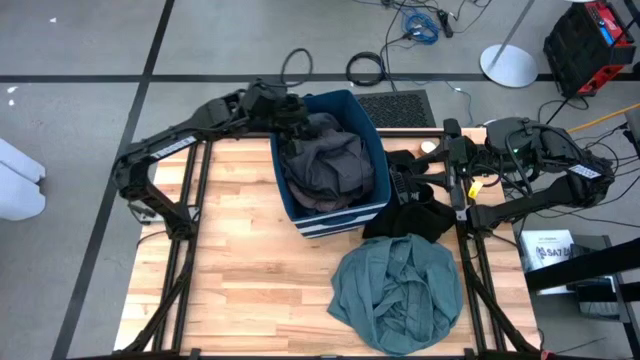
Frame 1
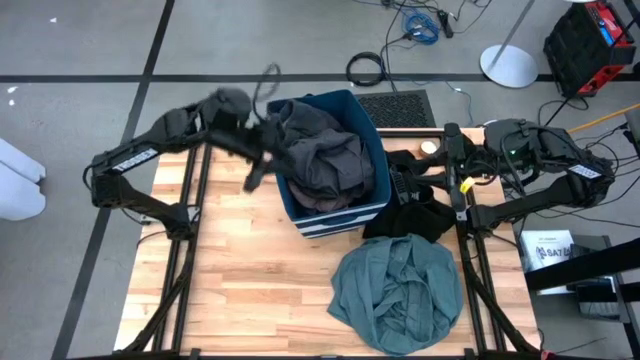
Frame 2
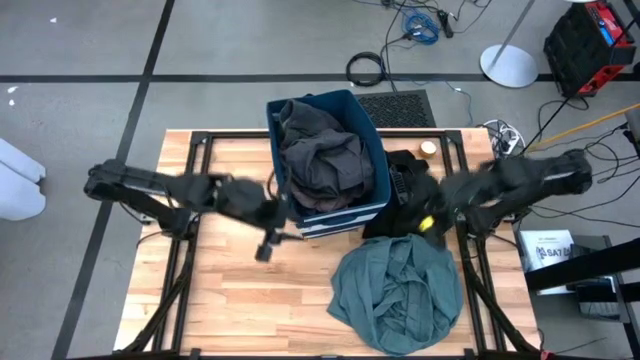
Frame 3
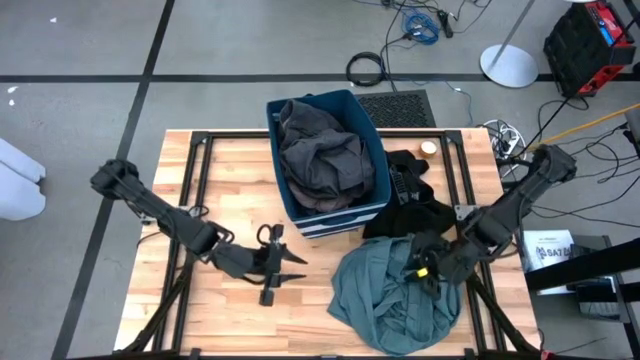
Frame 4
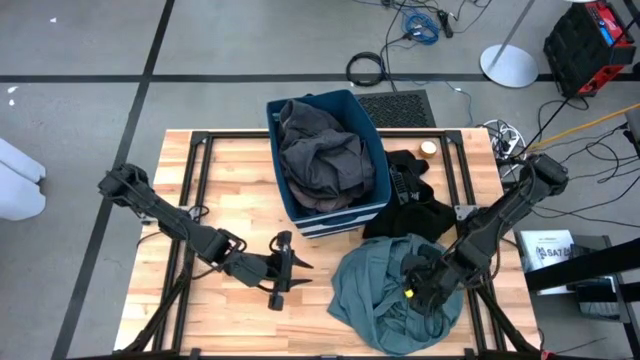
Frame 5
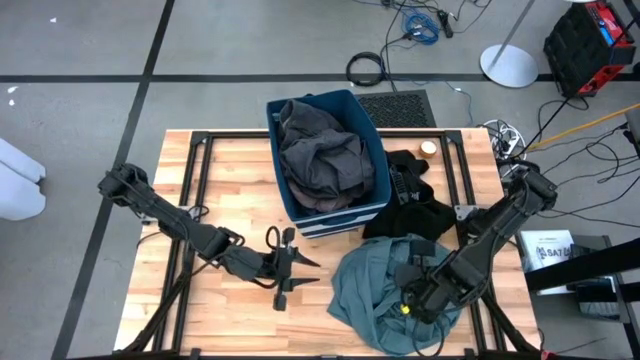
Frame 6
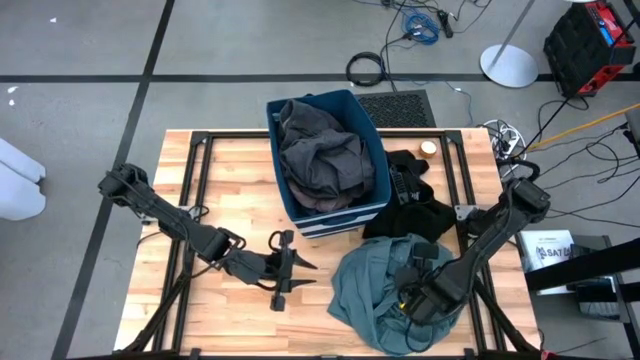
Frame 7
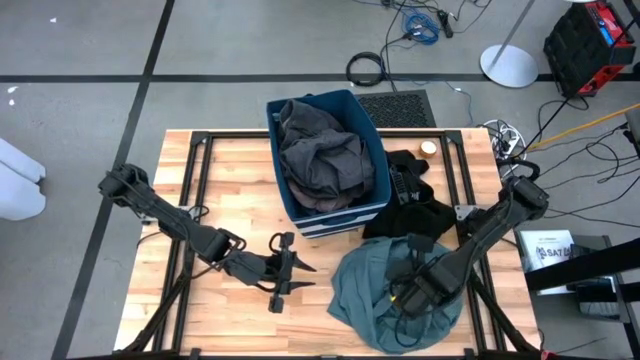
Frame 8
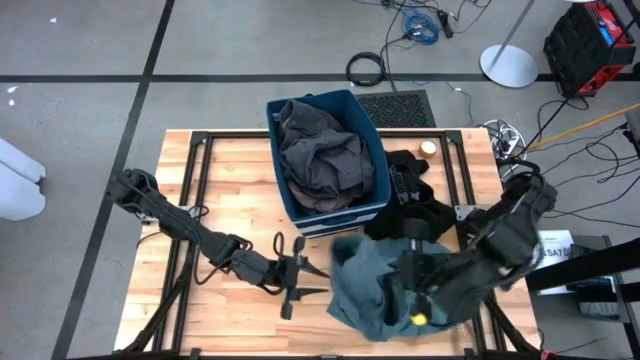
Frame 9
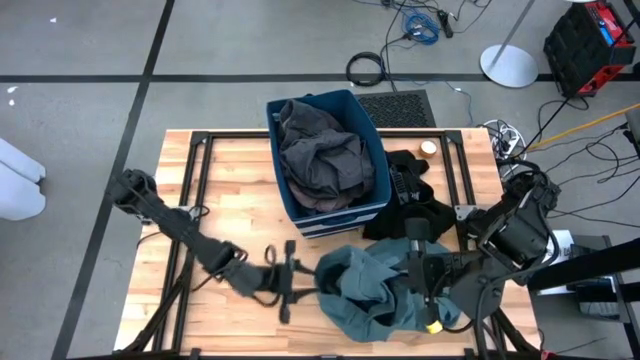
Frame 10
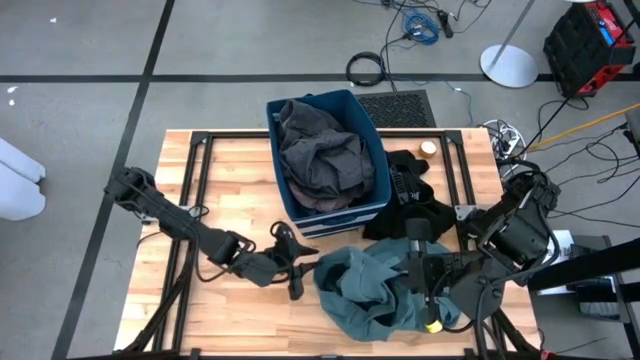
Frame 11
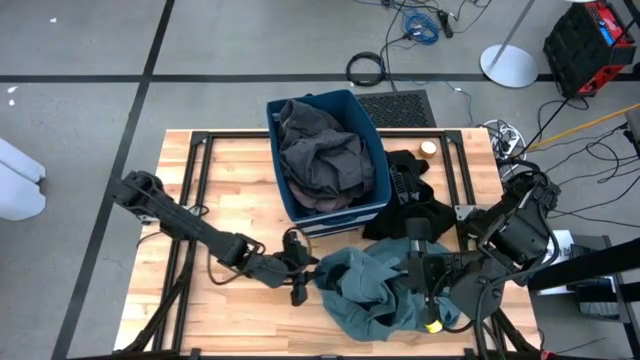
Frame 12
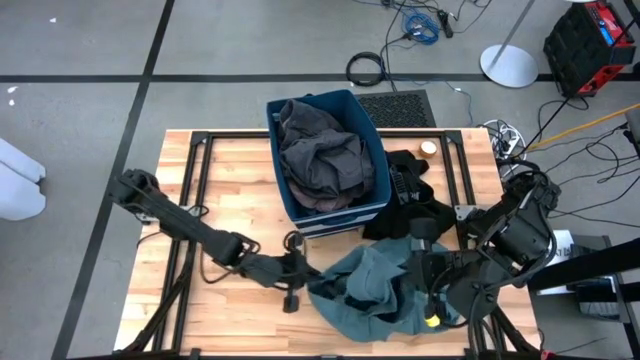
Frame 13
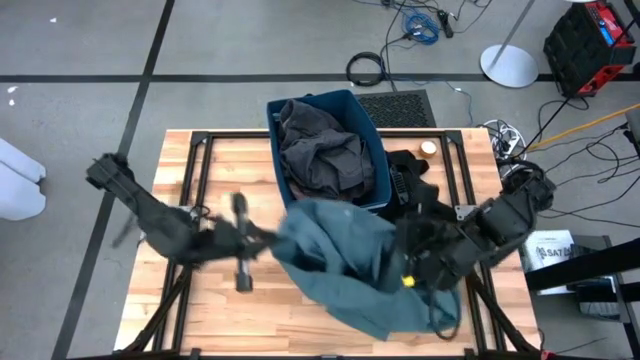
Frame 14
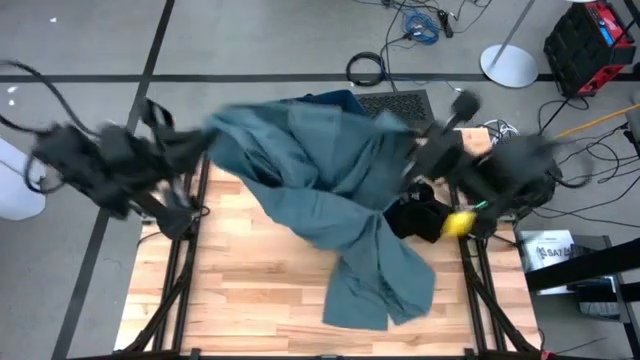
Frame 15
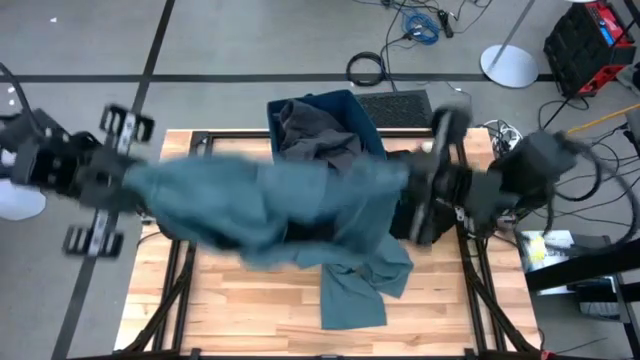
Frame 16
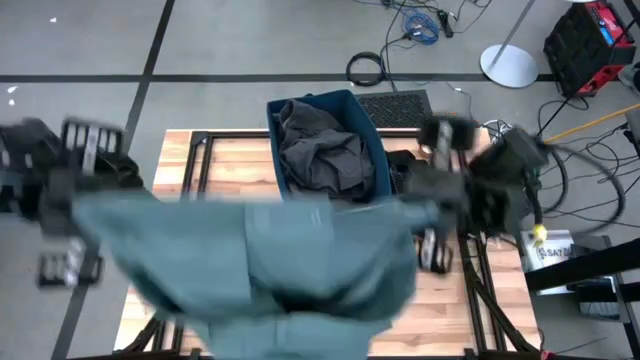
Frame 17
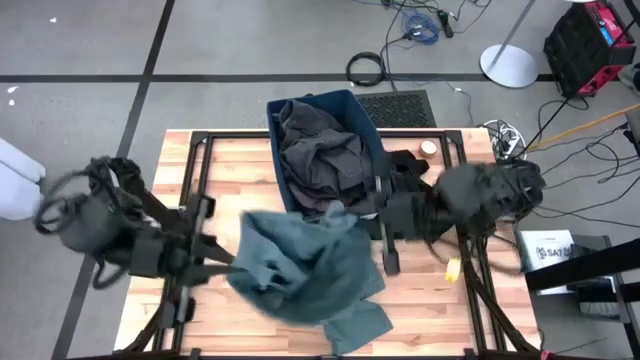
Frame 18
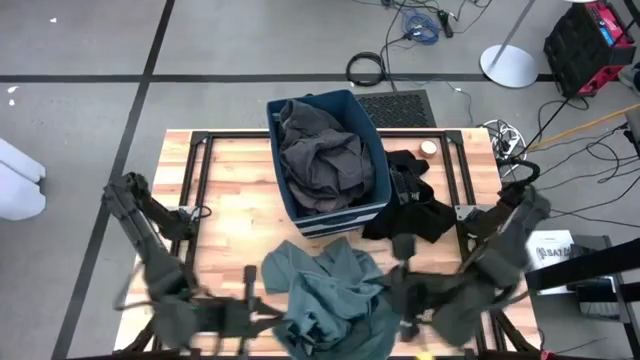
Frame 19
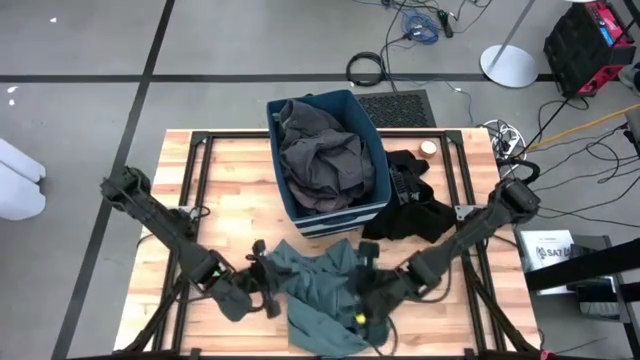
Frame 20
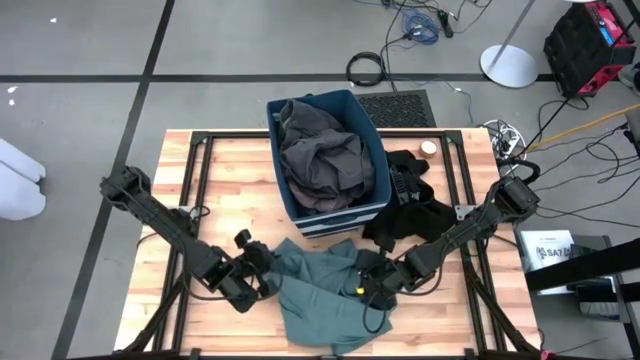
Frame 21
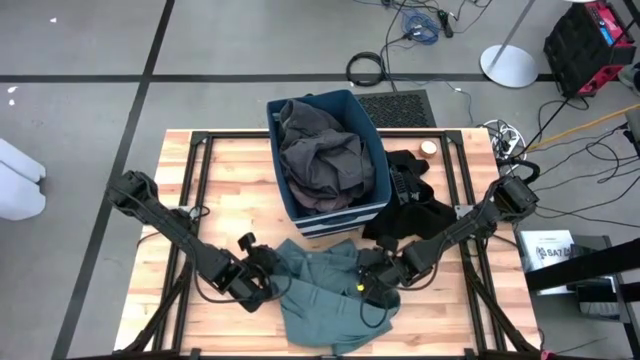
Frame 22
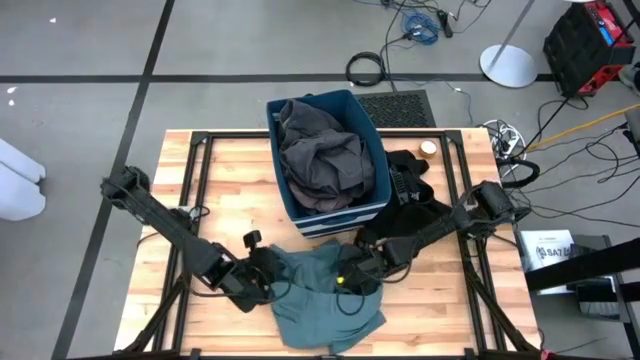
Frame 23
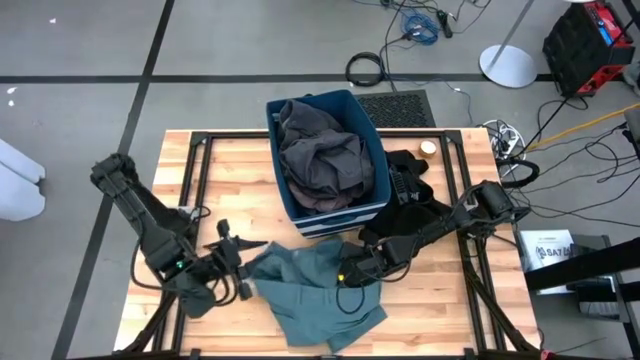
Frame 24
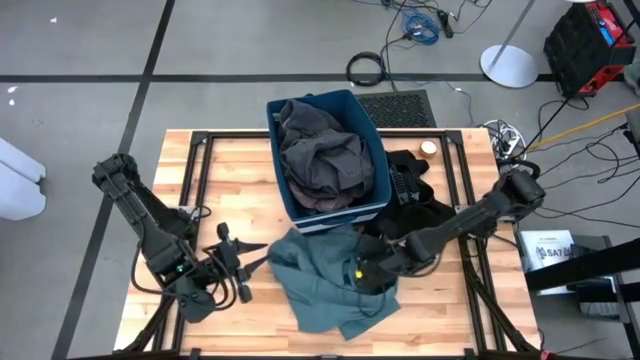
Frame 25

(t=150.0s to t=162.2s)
Task: Sort clothes
Put the blue pants into the blue laundry organizer

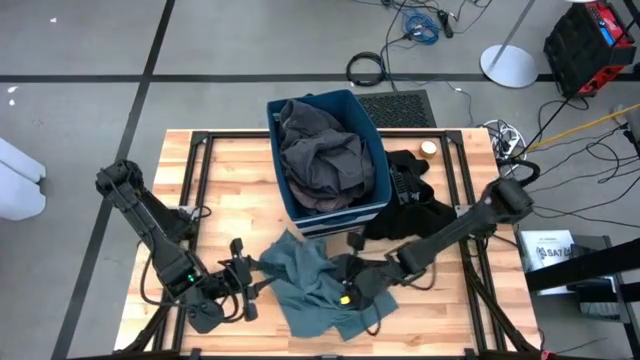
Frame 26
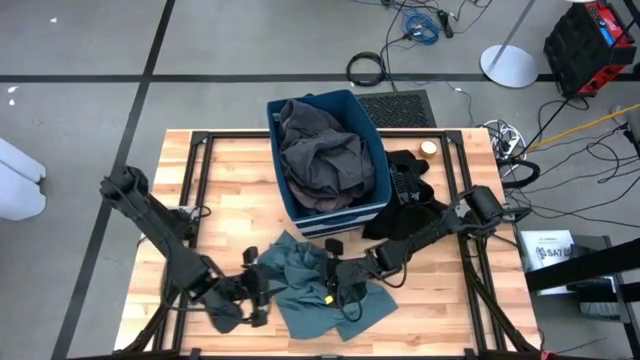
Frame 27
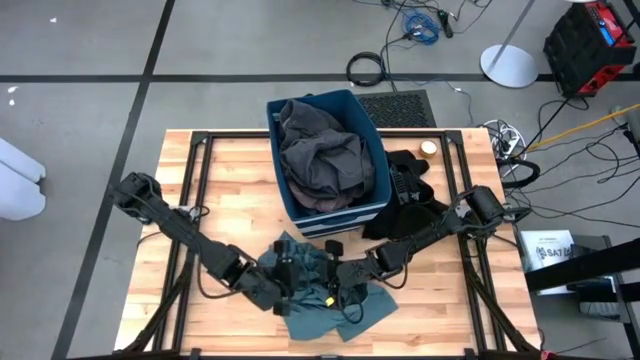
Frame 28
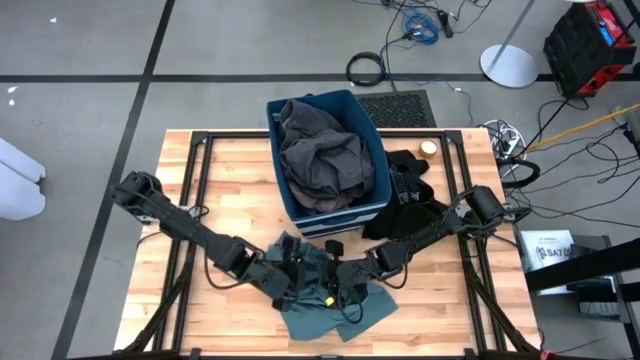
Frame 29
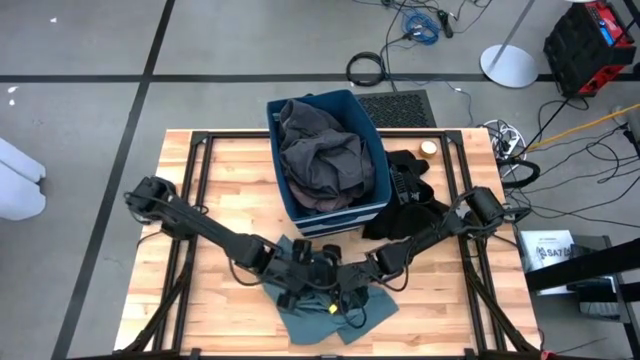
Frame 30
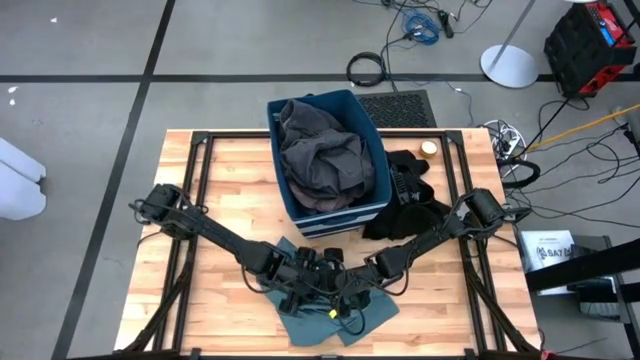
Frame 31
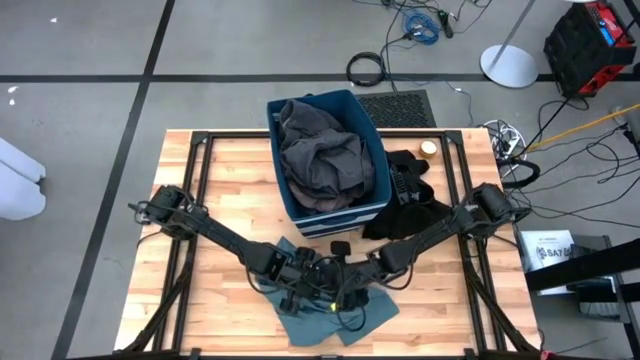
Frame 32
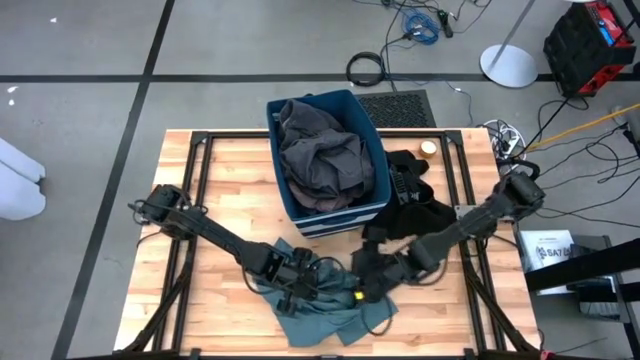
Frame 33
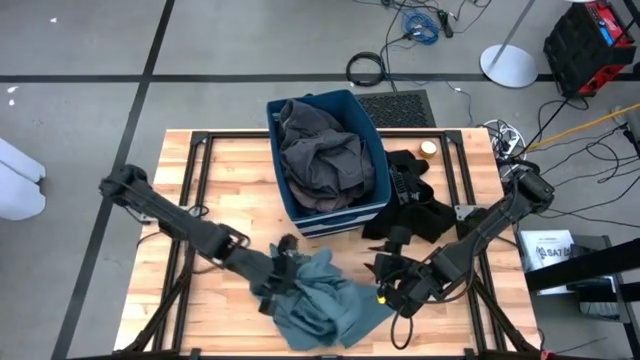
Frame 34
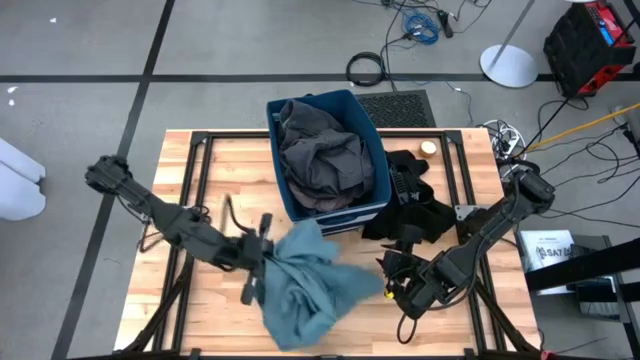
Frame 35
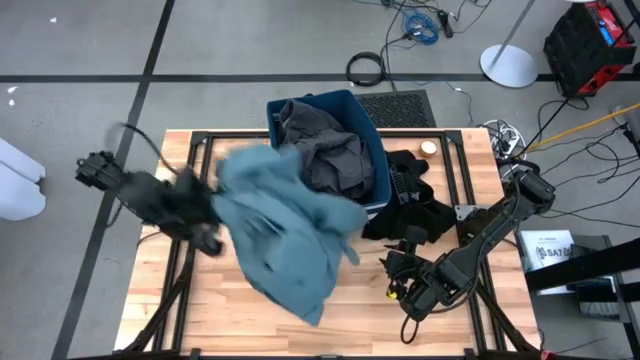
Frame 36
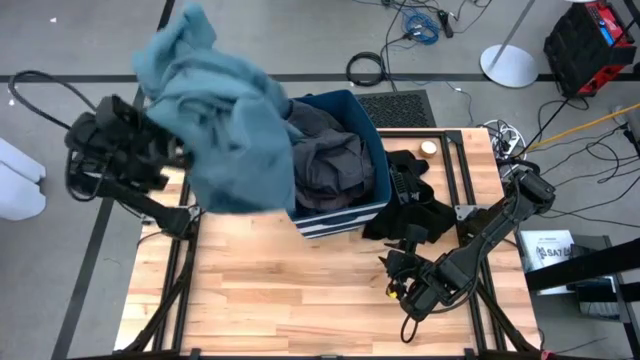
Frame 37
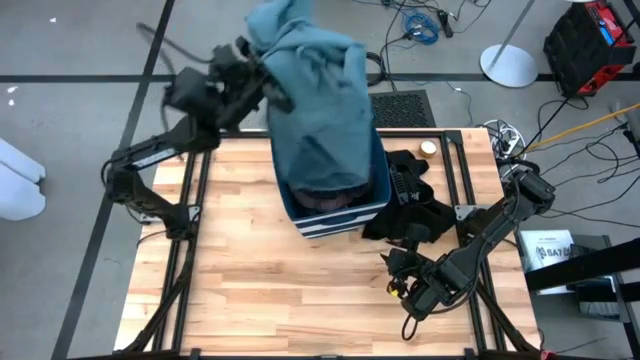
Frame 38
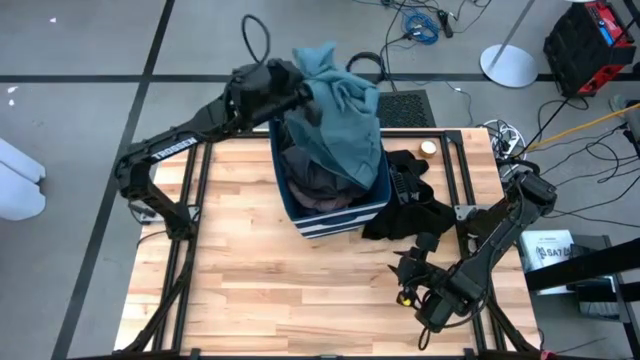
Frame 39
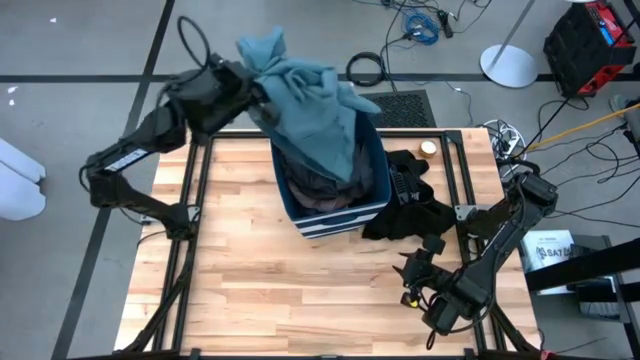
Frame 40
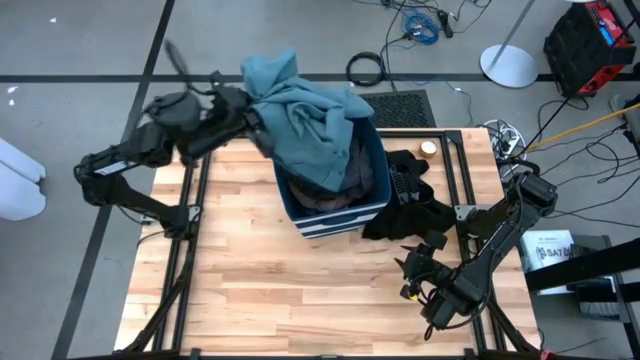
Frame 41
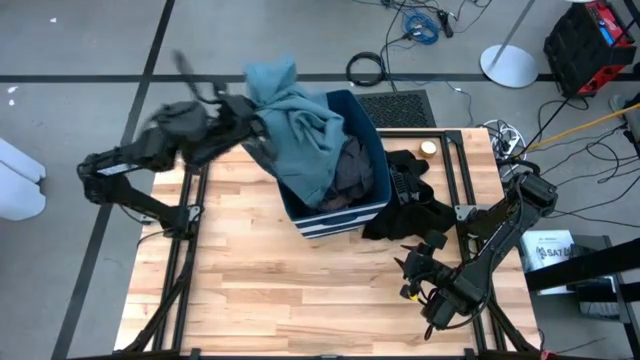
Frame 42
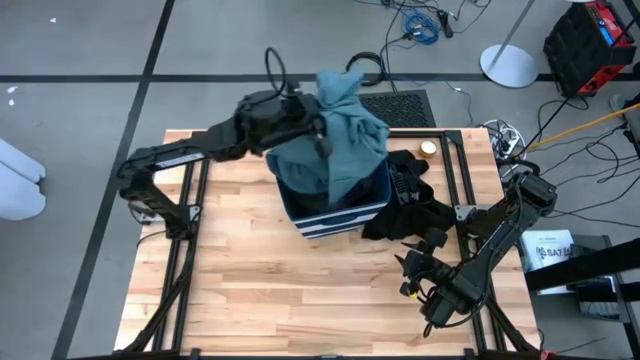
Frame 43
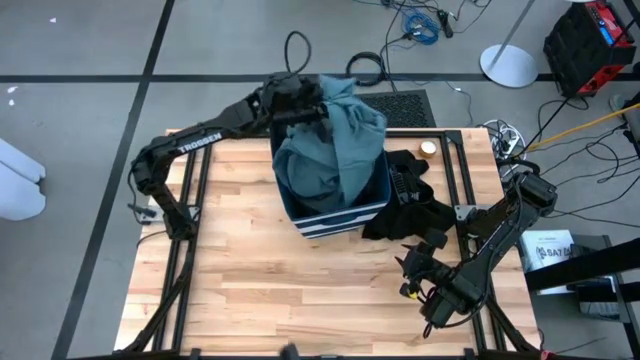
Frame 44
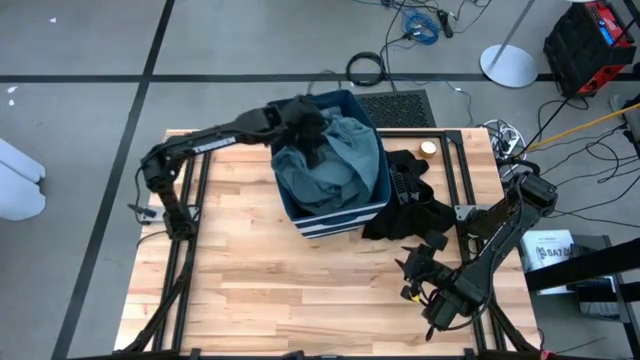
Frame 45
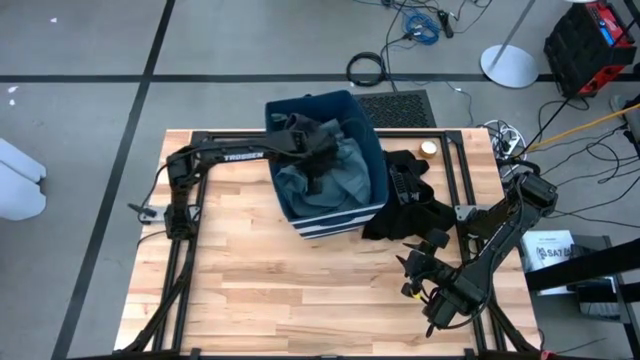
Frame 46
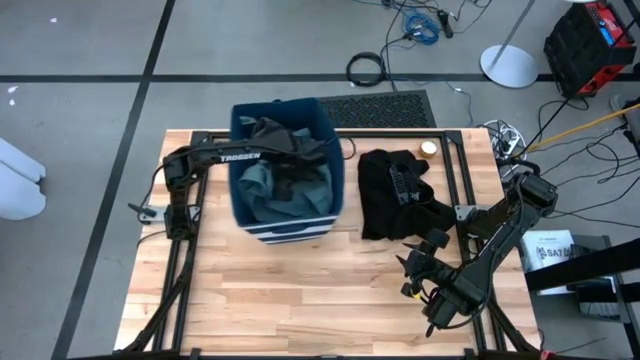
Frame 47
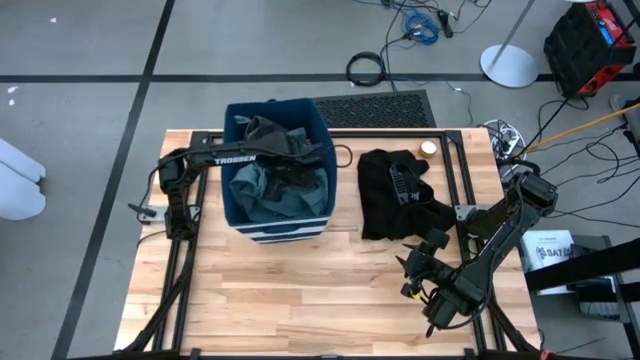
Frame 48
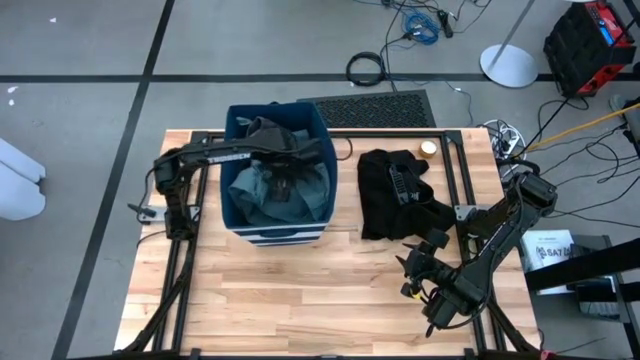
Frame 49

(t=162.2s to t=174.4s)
Put the blue pants into the blue laundry organizer
